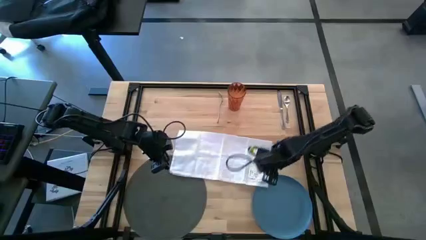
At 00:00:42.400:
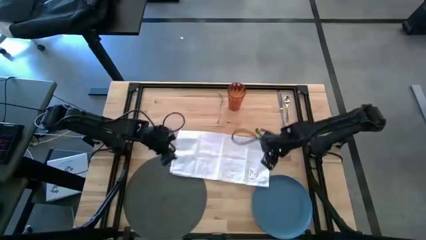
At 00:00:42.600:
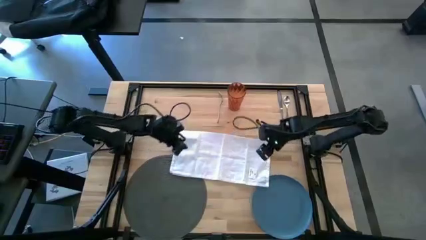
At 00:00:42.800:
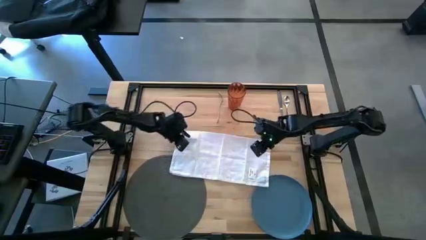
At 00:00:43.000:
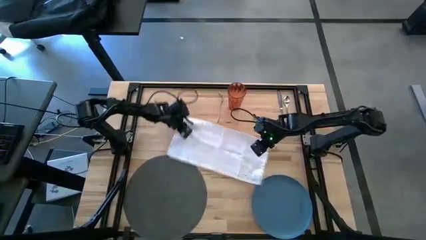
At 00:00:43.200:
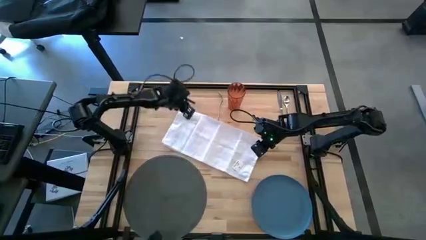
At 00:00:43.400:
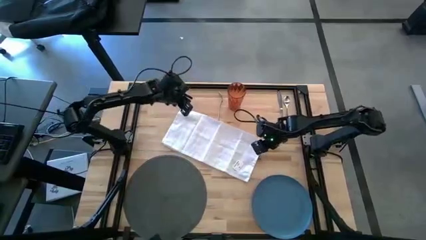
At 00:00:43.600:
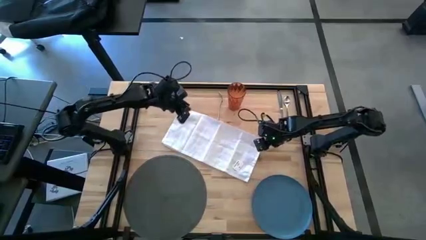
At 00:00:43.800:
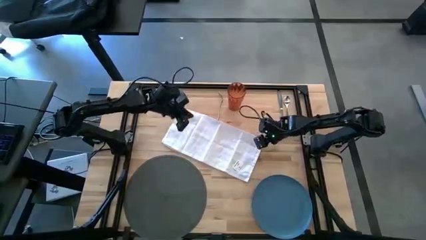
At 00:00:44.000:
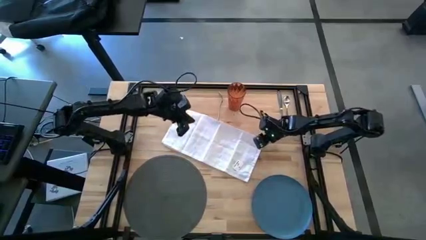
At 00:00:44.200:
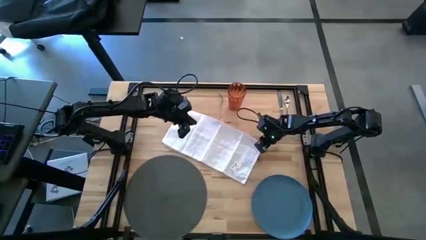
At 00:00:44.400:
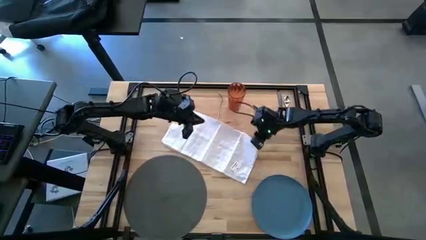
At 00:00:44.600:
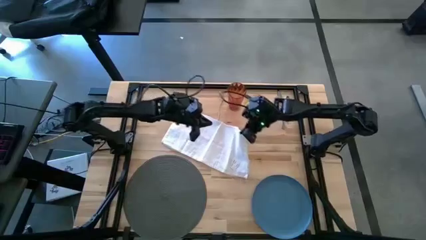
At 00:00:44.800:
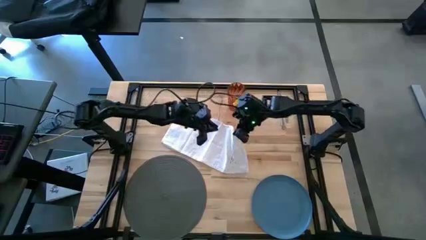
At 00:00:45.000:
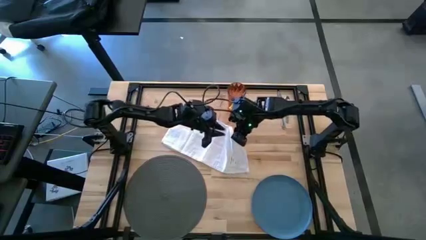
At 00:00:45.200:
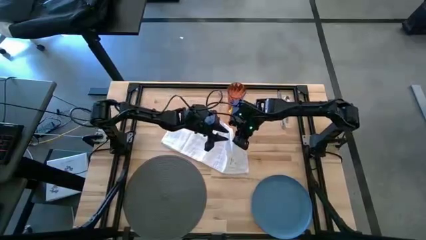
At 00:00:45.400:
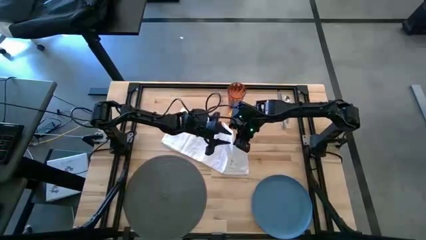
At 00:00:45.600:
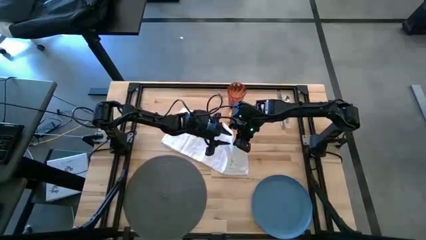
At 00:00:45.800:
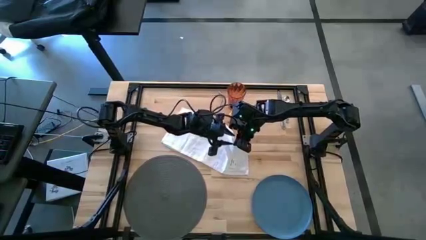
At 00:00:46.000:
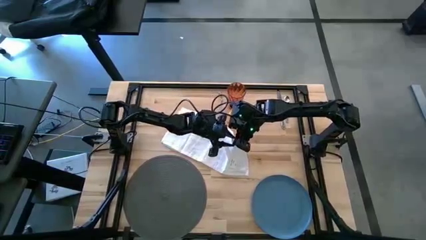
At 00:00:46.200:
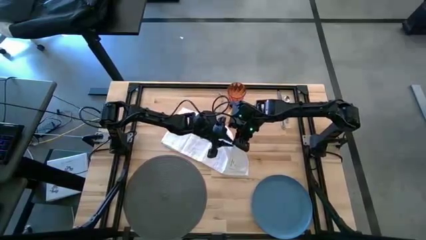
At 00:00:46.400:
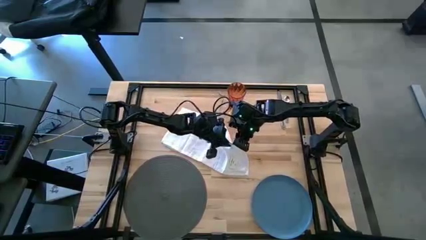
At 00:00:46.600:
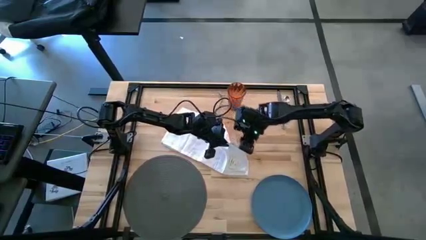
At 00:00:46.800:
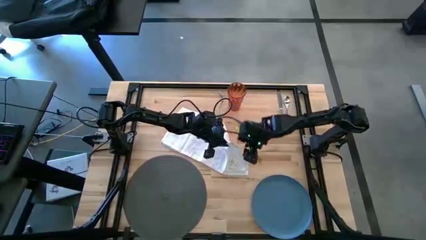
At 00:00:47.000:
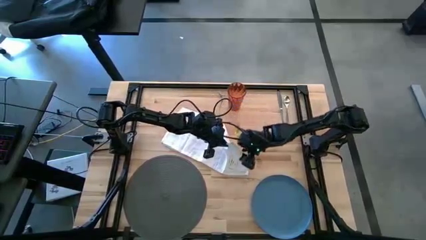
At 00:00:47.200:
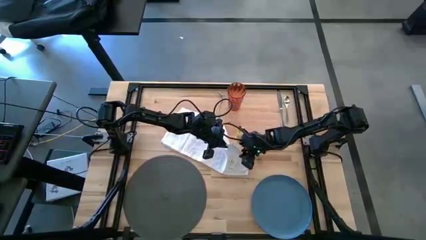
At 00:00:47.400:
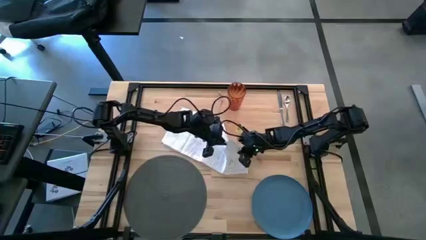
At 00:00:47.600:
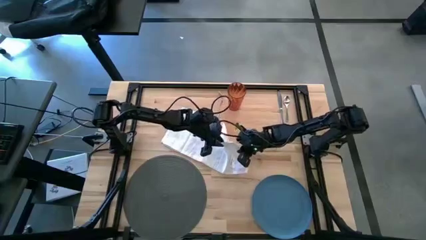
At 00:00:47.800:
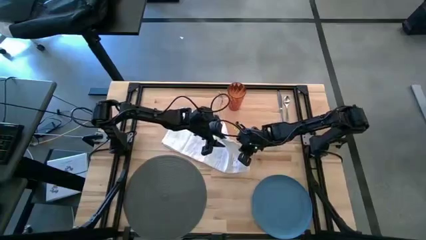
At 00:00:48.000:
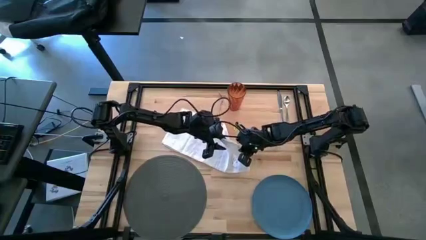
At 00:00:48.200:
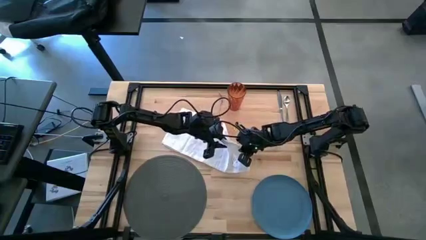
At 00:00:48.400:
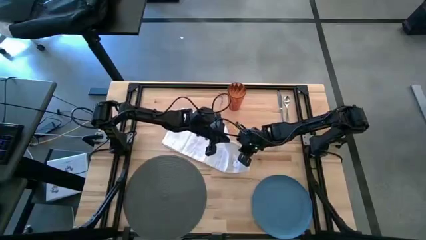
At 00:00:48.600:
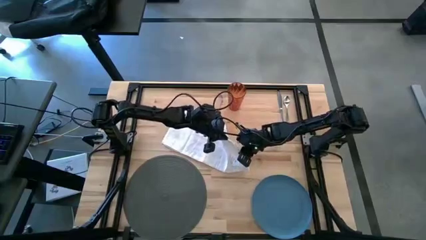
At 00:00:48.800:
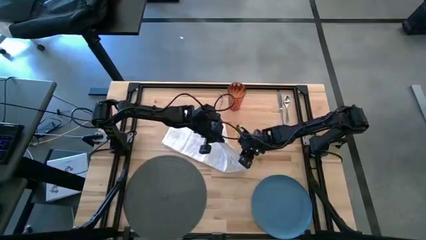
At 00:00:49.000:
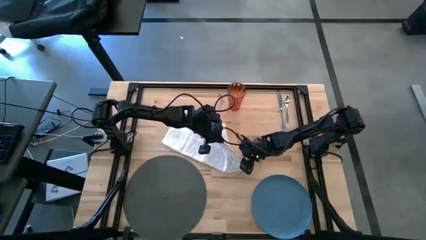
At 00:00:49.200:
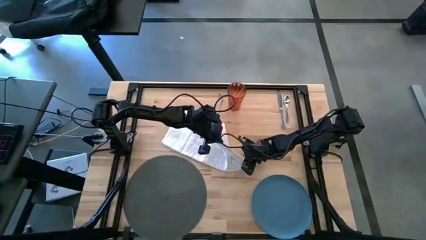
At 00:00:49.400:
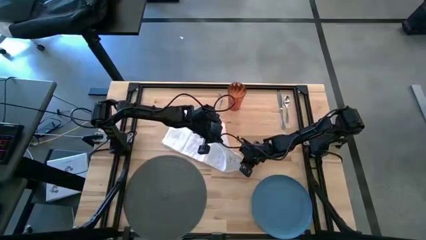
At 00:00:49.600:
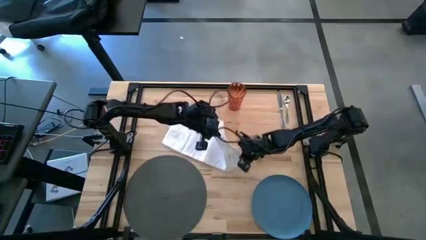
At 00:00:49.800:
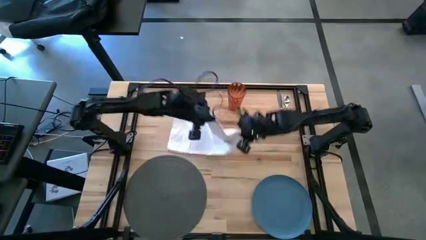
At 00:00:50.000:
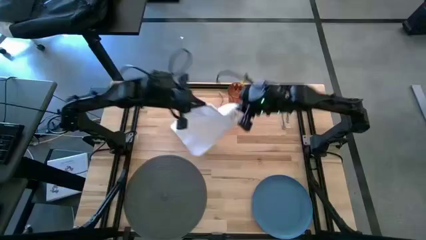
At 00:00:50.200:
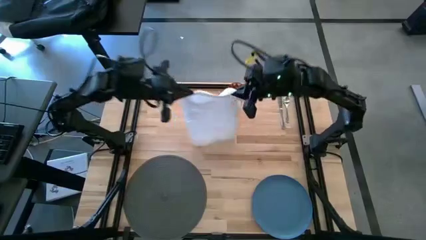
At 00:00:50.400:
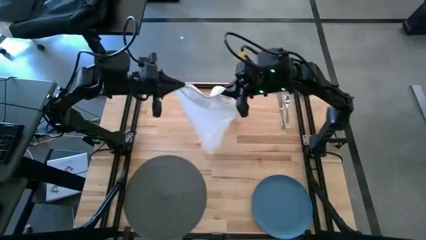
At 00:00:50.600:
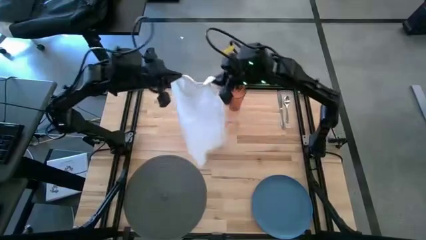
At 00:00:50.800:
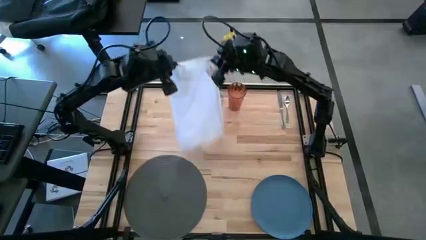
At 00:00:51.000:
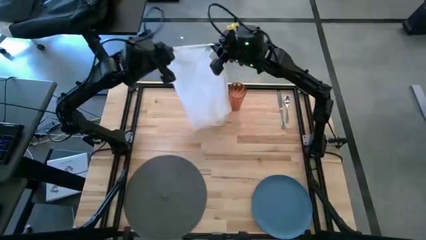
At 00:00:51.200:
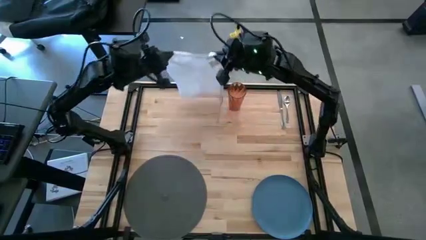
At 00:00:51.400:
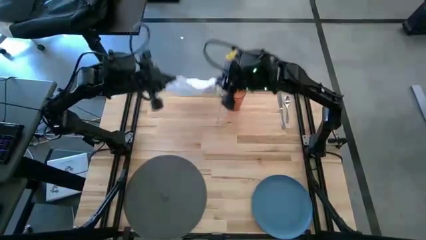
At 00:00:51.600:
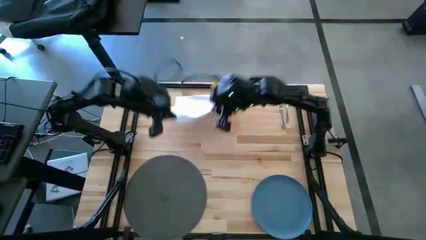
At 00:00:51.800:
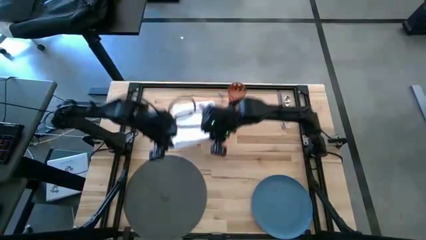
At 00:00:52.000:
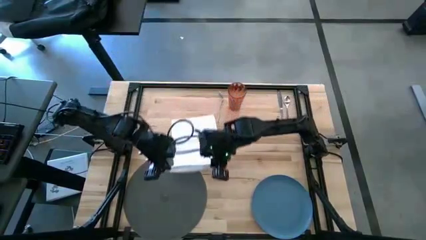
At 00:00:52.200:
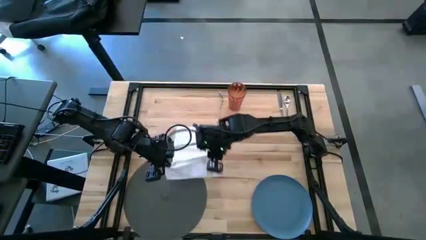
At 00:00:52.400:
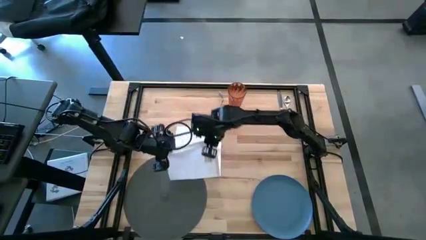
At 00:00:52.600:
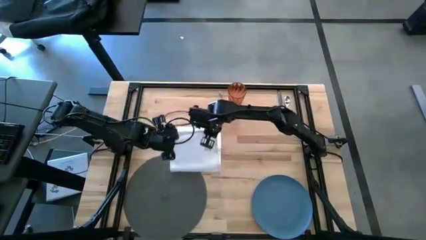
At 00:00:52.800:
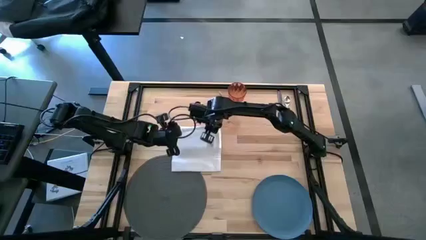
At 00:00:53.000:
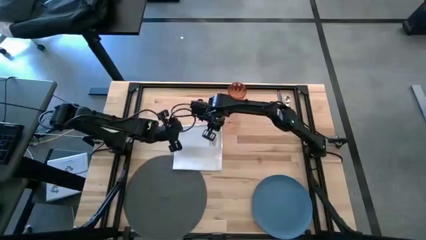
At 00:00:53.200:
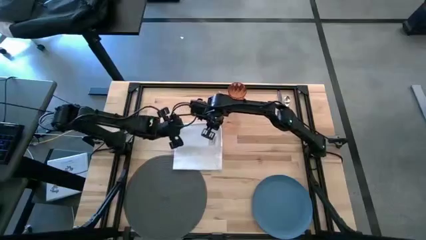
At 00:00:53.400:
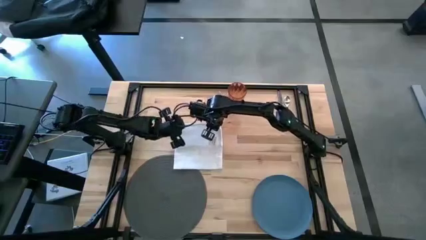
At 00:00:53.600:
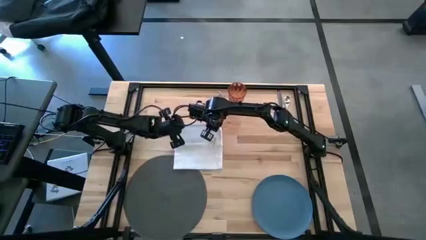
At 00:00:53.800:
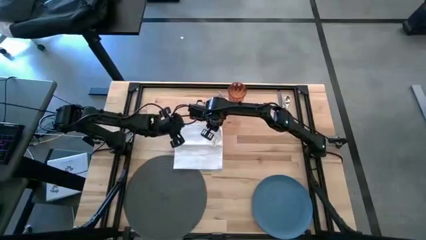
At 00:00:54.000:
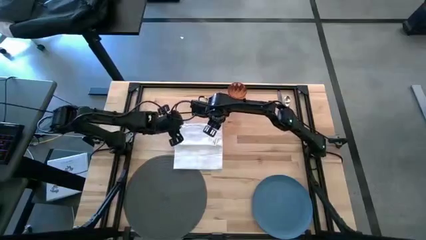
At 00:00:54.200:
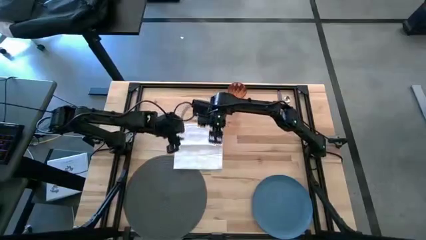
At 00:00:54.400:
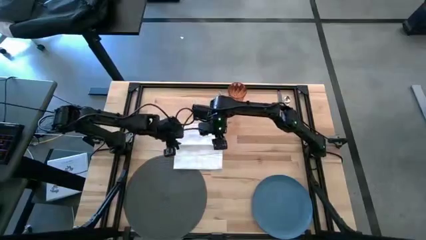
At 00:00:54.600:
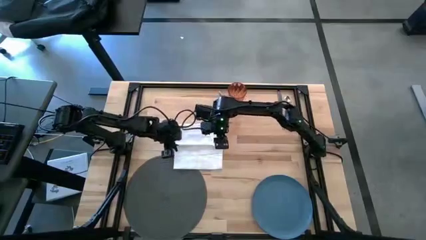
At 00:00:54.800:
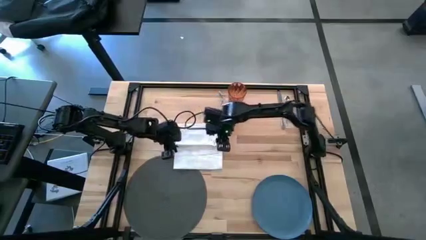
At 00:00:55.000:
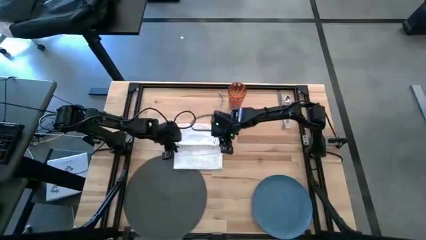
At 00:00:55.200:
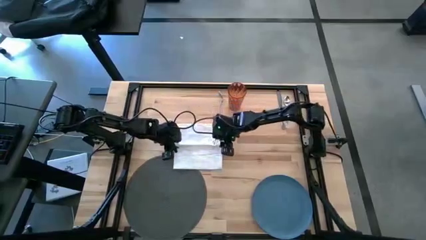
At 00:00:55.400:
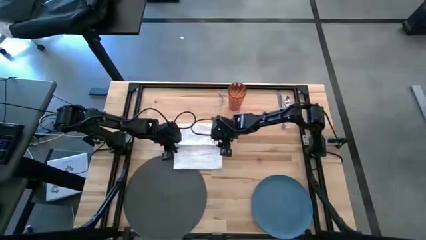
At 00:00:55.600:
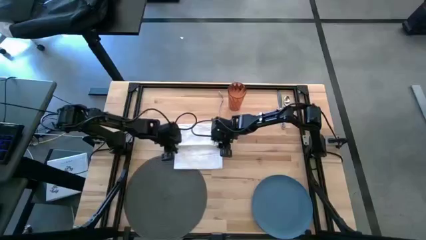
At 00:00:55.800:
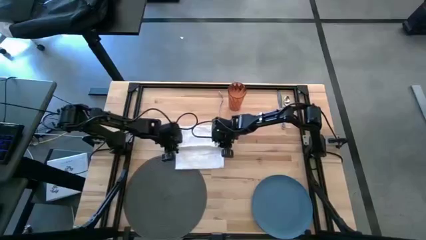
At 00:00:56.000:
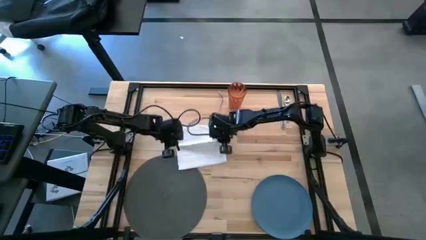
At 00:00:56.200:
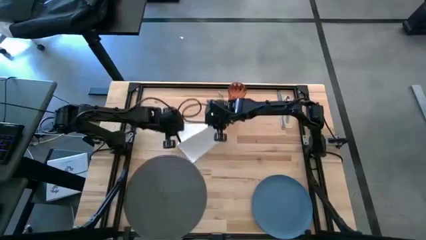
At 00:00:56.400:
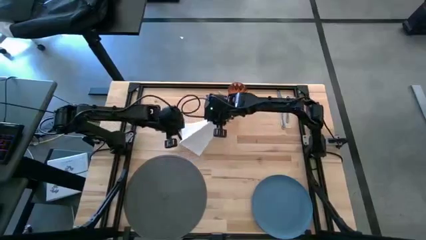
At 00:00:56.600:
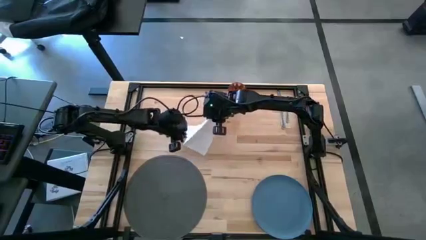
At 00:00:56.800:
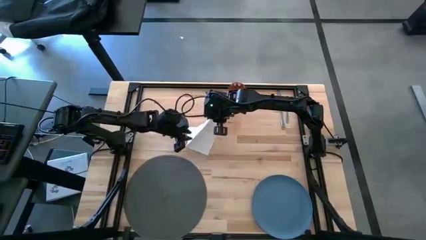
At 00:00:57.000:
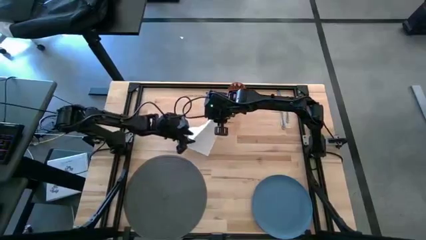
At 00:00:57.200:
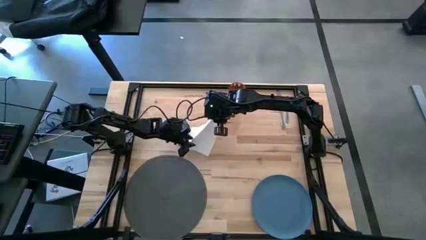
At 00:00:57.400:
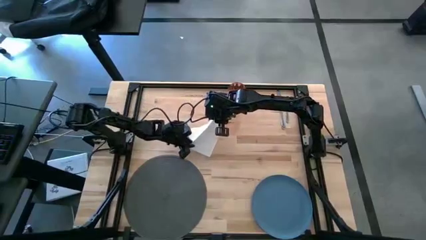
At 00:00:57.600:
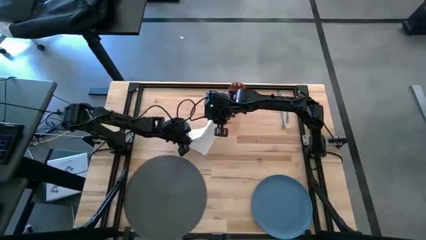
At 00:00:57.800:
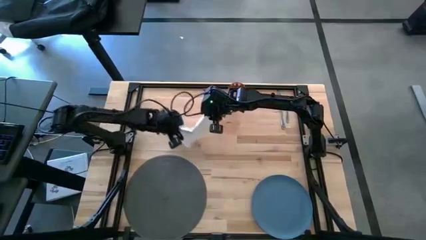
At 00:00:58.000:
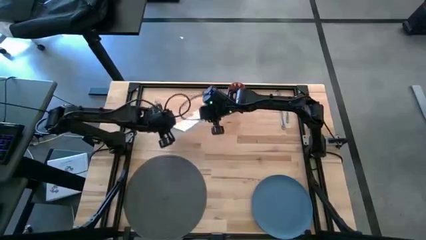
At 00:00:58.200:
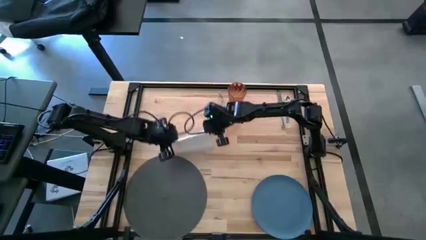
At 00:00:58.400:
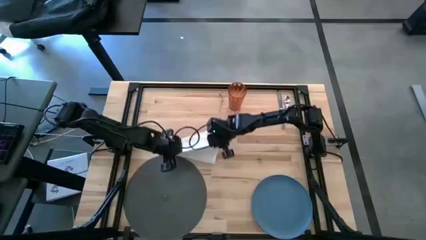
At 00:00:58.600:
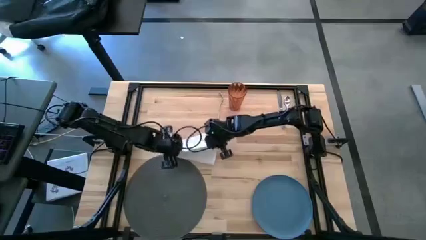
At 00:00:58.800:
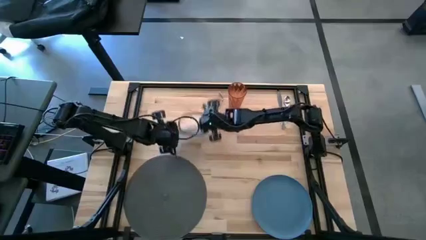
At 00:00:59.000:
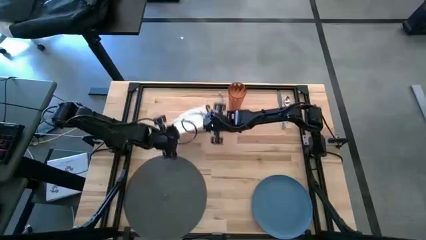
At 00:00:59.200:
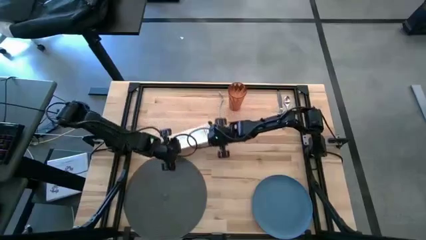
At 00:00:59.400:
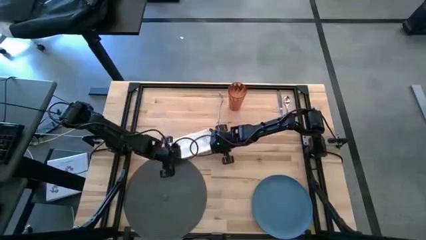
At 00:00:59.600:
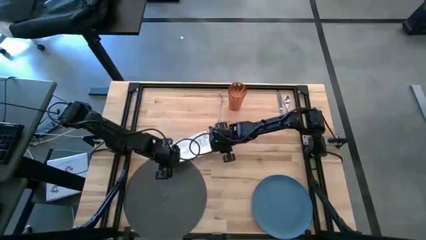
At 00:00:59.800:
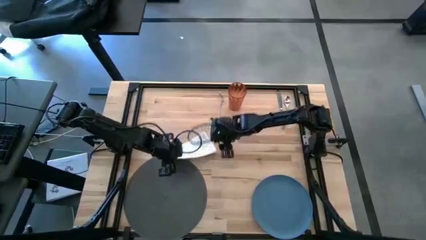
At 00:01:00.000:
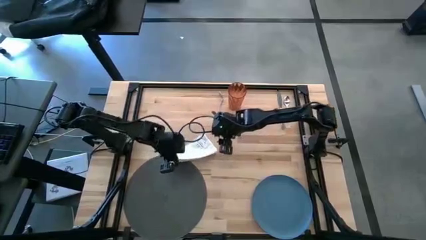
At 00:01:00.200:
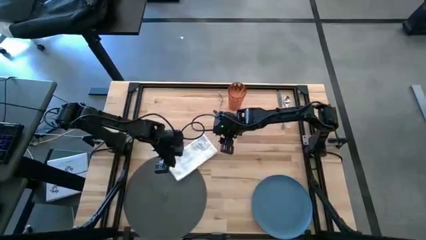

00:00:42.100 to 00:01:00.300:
Task: Set table place
Fold the white napkin
